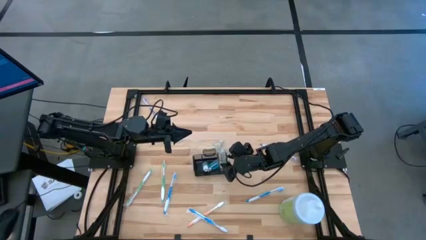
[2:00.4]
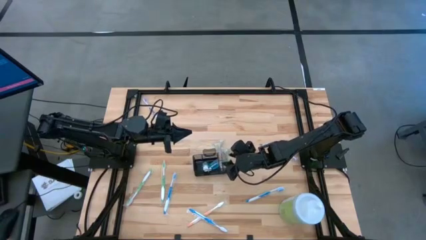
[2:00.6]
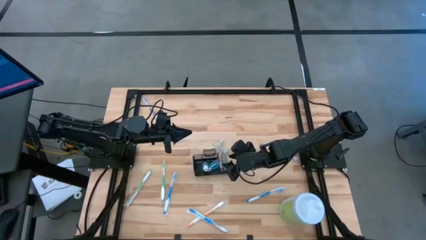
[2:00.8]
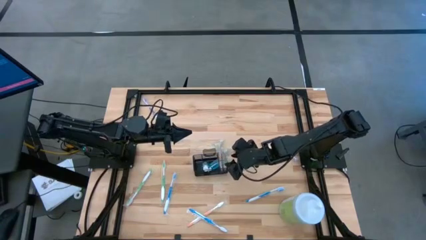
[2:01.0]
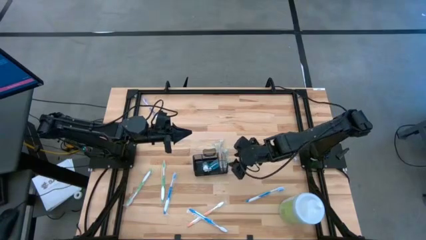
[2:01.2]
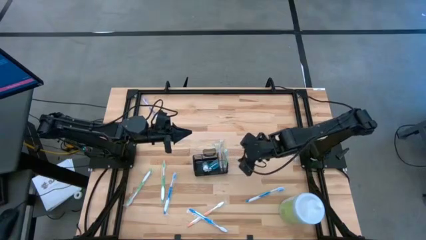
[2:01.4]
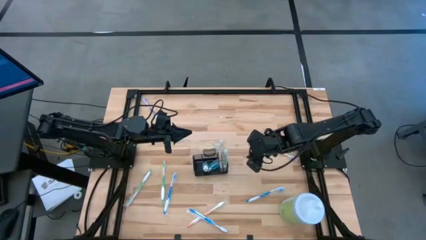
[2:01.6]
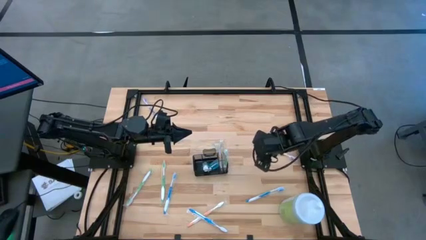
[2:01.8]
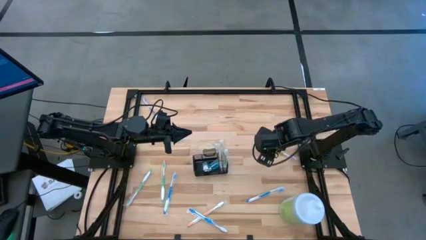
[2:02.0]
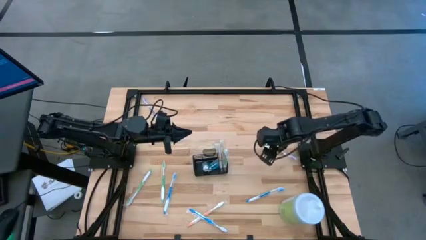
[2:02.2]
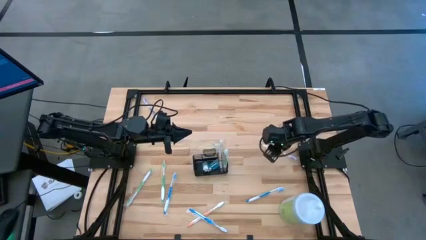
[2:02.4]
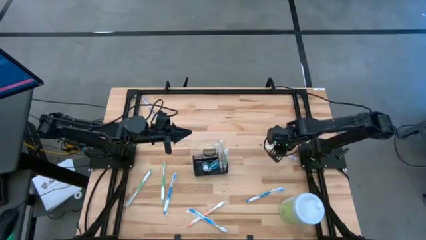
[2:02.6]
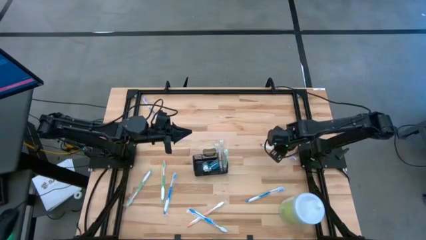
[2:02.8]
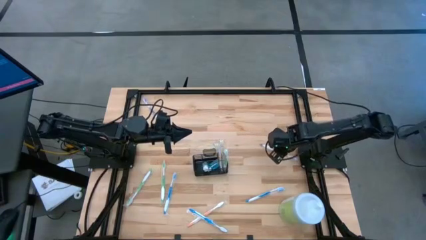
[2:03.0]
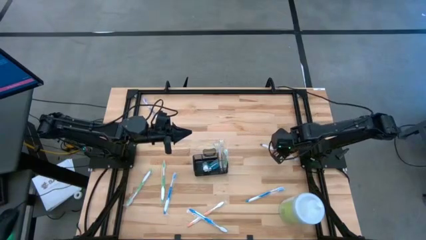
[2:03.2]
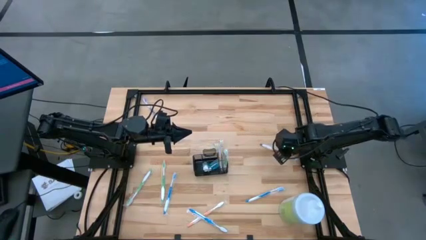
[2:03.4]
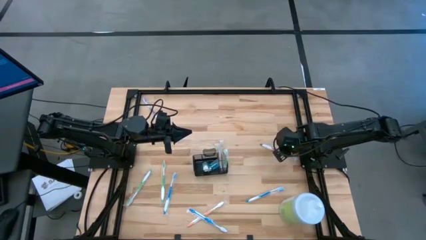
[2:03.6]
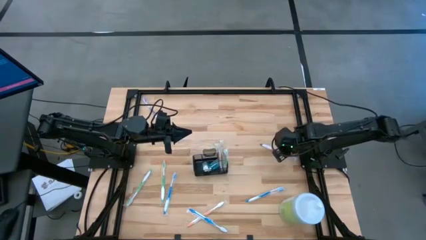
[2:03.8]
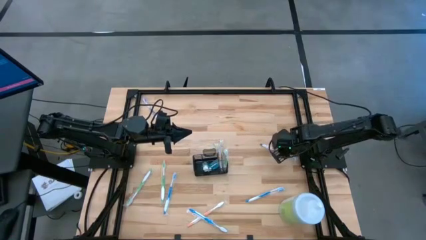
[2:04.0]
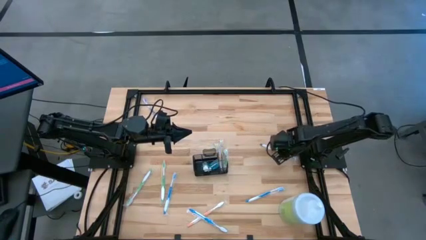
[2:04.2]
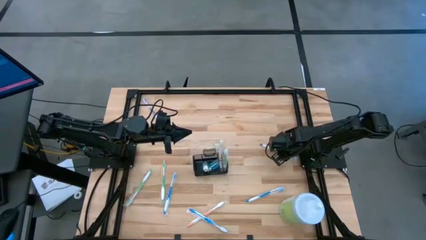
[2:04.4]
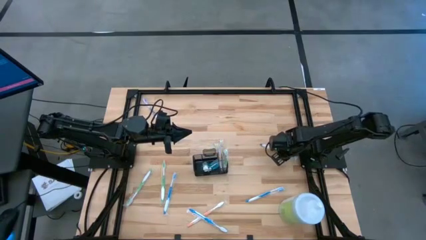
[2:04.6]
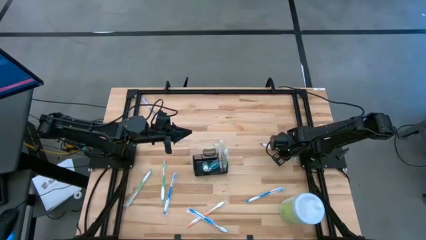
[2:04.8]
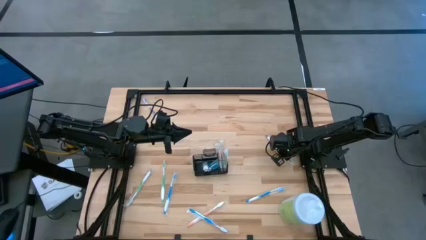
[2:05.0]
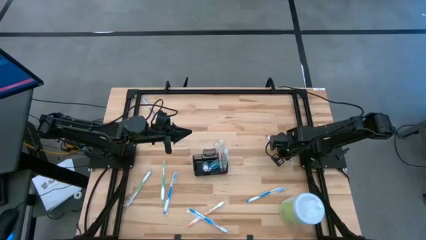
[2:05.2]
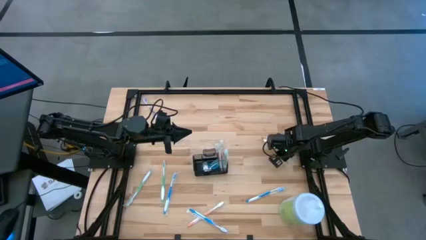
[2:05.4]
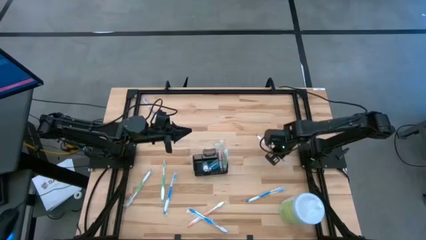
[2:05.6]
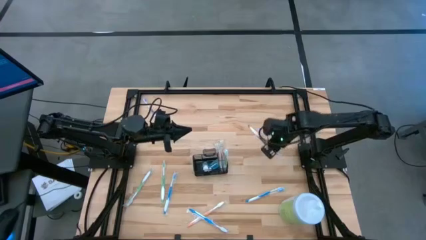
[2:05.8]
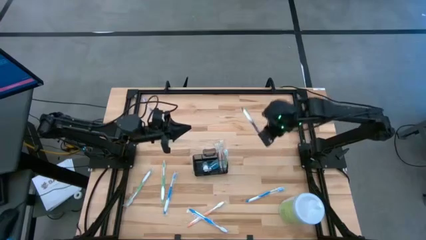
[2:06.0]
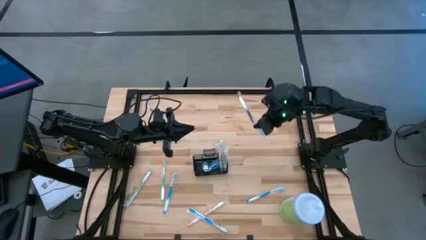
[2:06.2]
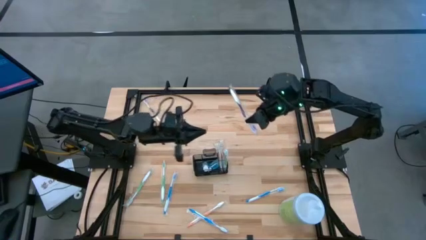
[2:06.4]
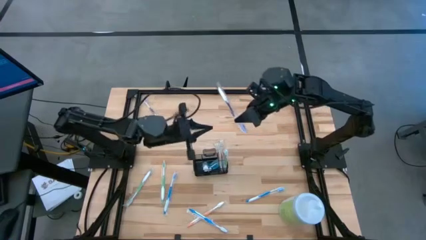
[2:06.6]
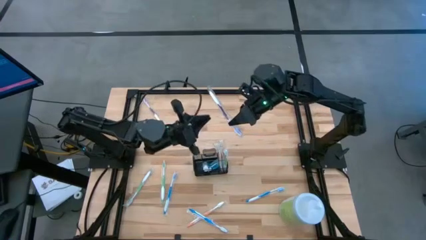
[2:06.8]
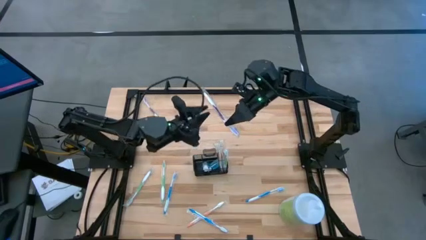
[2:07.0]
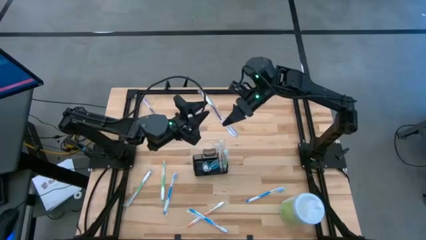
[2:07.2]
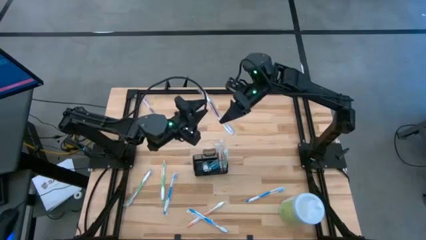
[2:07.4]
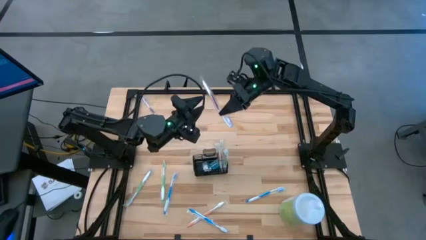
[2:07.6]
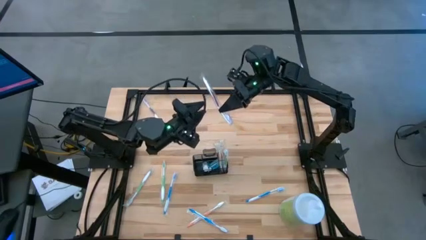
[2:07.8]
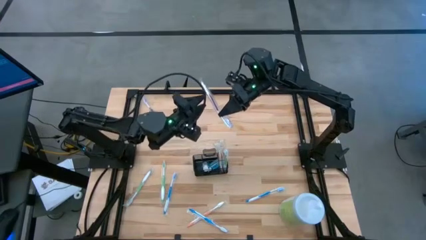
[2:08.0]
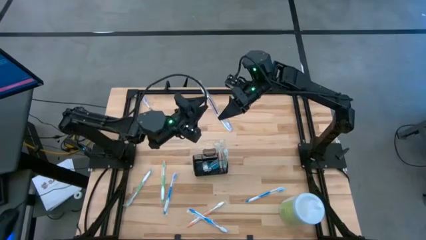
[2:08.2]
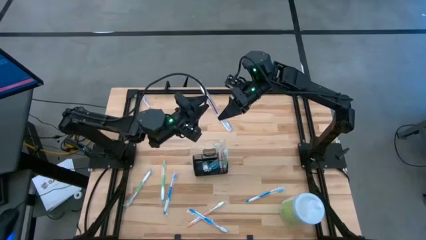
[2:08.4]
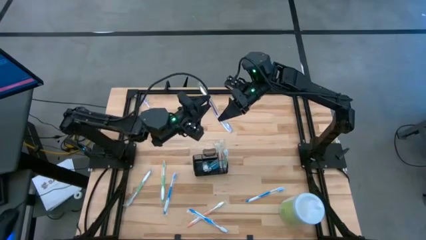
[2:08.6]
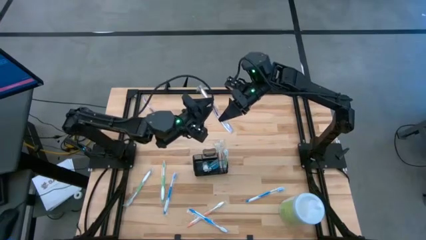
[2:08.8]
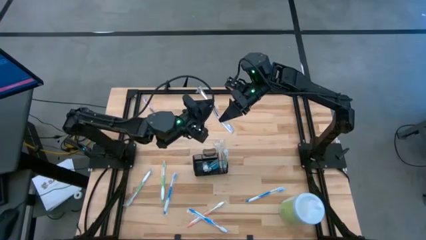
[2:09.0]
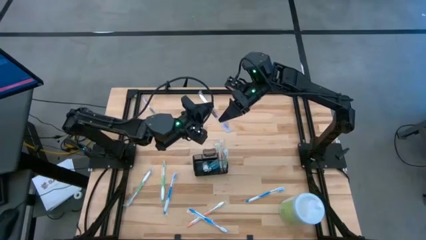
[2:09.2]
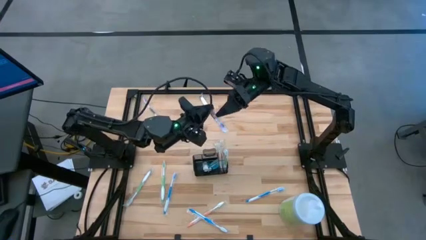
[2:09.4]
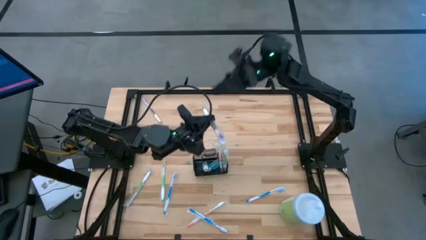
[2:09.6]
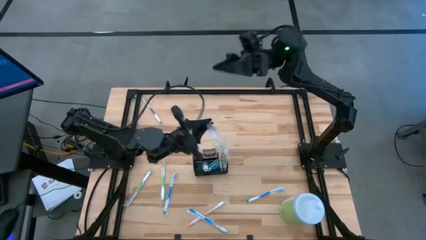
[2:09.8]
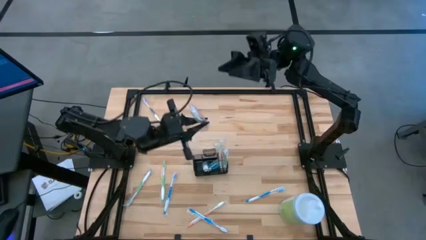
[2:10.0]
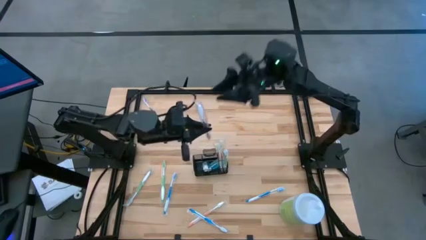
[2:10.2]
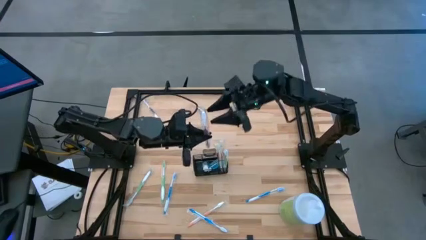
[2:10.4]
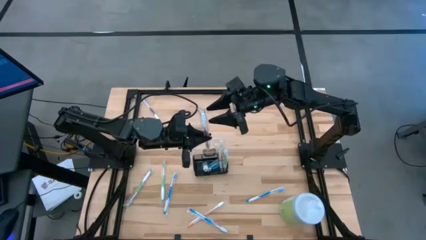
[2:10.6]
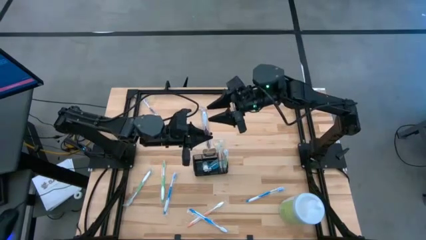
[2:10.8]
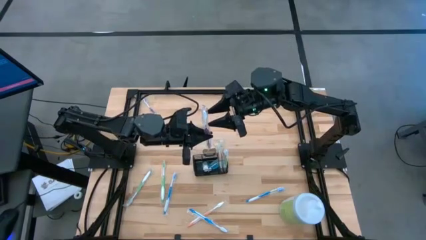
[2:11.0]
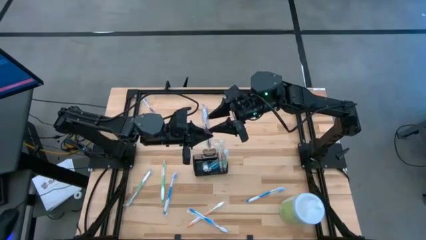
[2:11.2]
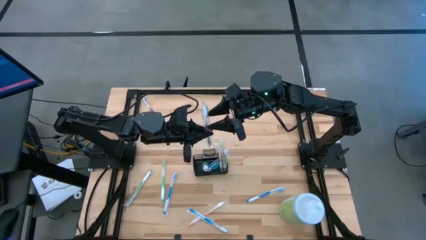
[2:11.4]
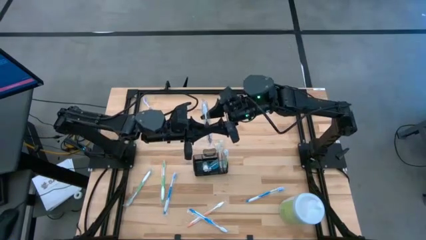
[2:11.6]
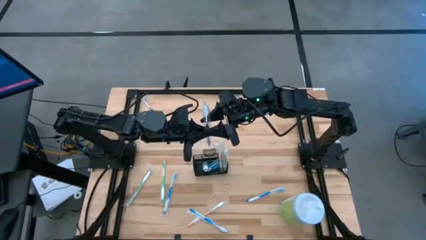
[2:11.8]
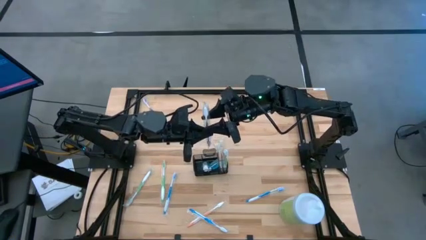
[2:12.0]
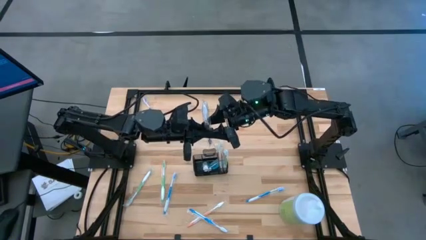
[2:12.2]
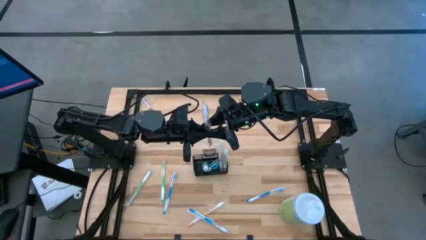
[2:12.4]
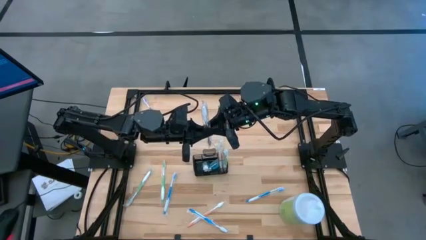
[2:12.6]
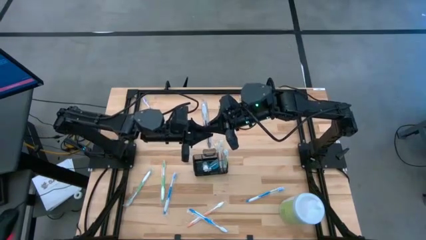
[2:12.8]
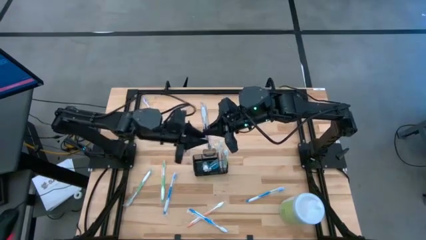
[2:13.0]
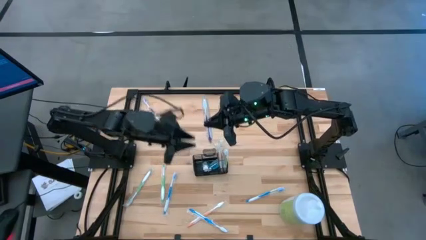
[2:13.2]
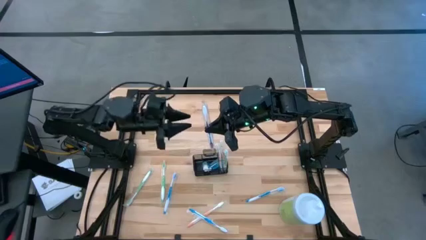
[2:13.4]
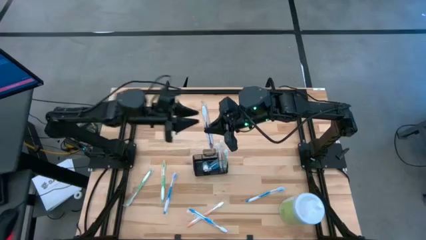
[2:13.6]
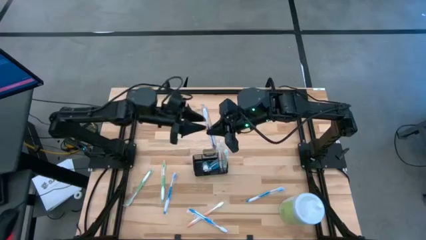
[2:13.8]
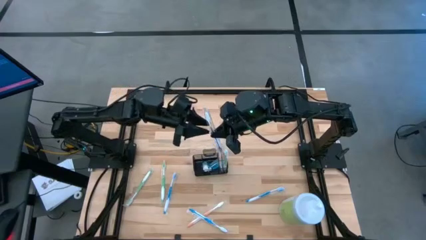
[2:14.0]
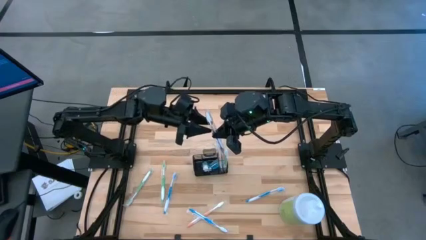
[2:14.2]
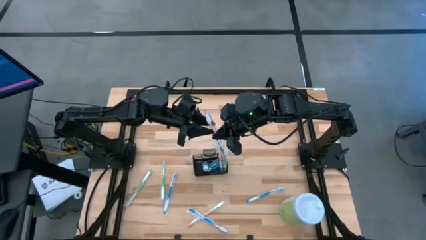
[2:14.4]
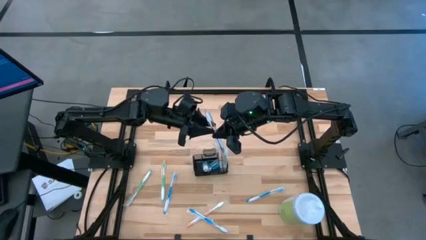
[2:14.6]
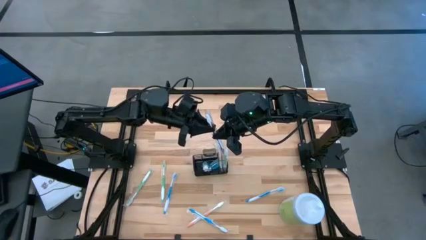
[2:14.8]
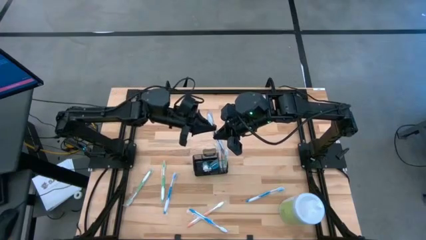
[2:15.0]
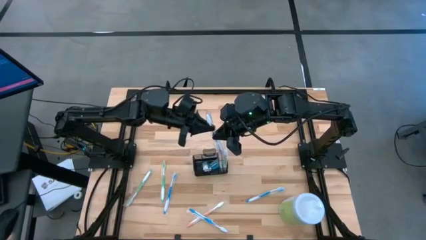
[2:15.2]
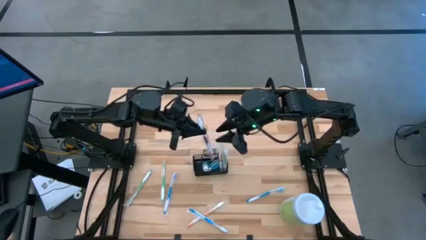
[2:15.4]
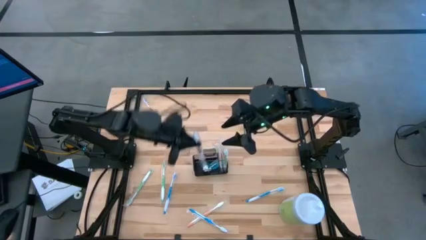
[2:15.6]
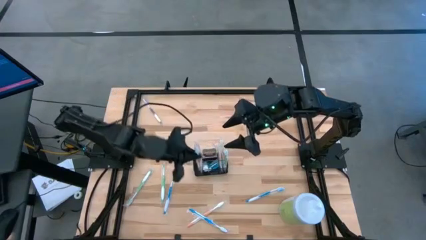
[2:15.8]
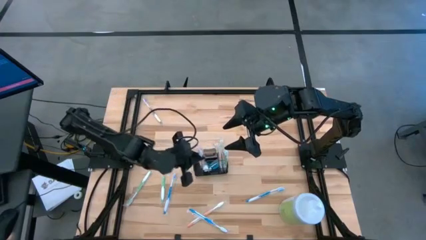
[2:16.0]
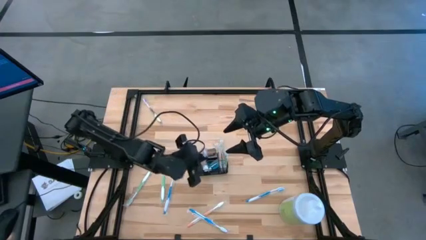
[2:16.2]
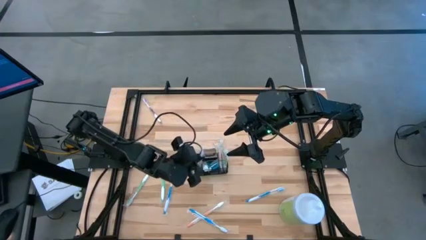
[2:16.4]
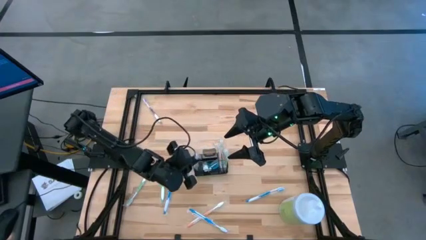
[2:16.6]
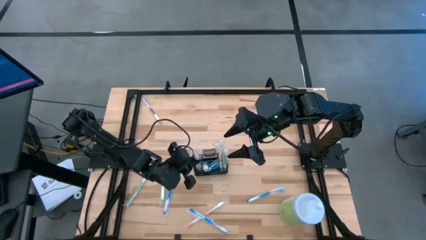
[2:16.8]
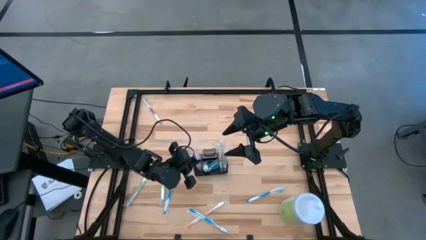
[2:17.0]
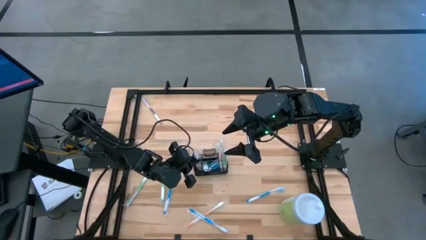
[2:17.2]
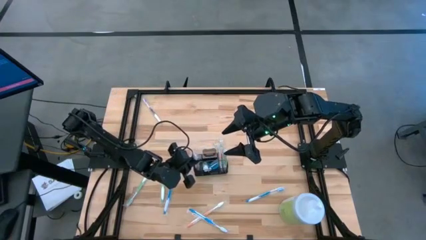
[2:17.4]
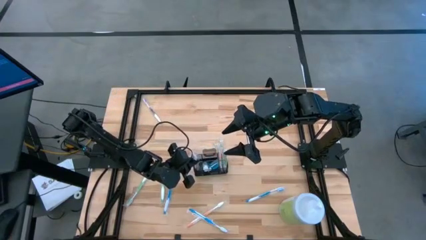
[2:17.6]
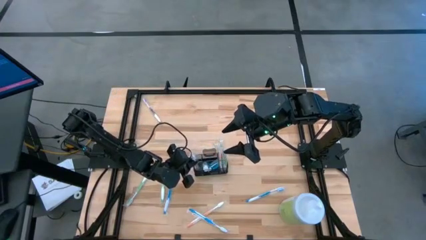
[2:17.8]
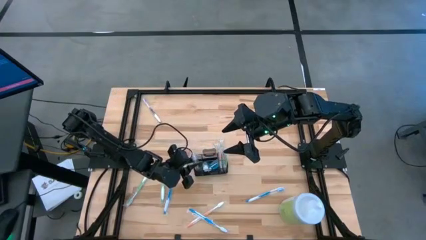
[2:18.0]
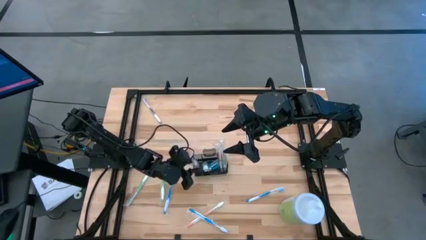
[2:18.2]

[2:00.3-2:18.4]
Task: Pick & Place toothbrushing station
Put the right purple toothbrush into the bottom left section of the mesh organizer
